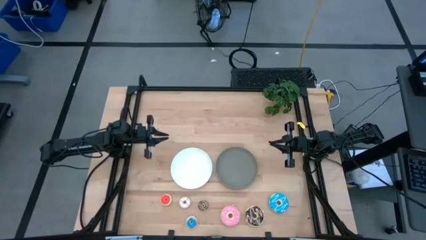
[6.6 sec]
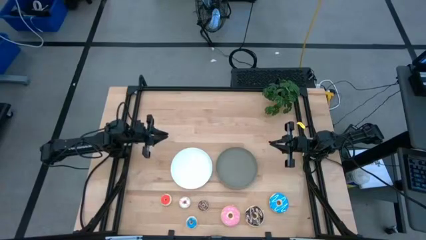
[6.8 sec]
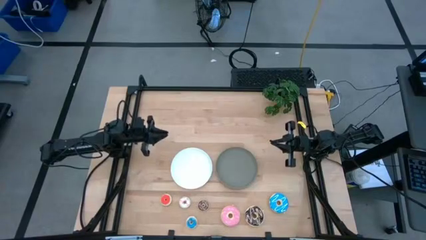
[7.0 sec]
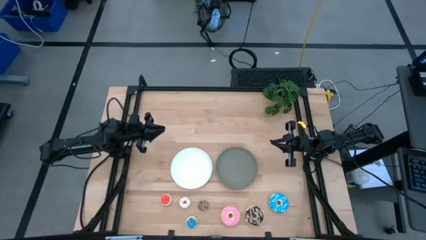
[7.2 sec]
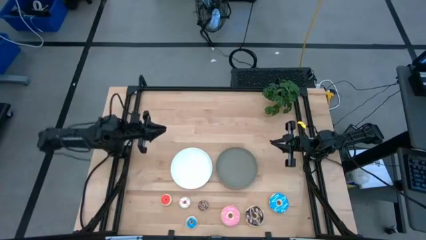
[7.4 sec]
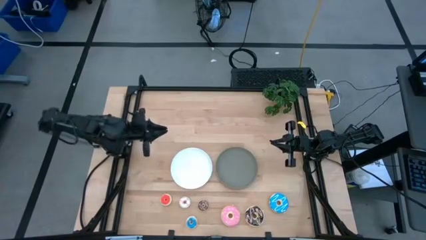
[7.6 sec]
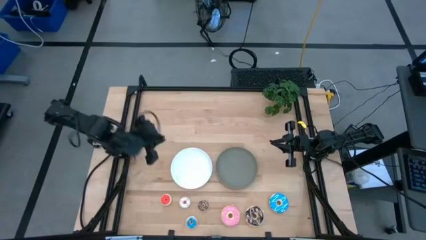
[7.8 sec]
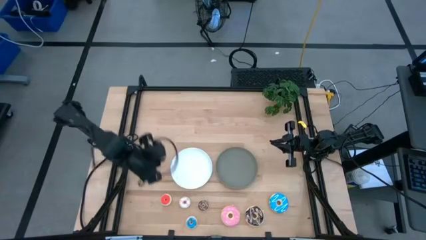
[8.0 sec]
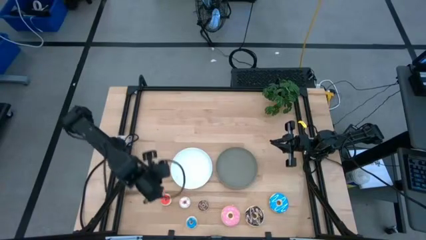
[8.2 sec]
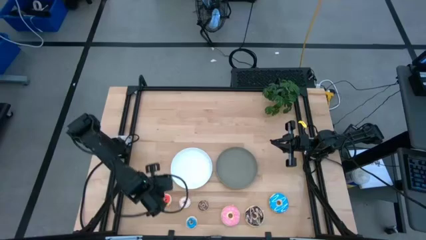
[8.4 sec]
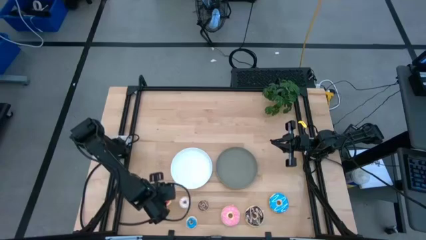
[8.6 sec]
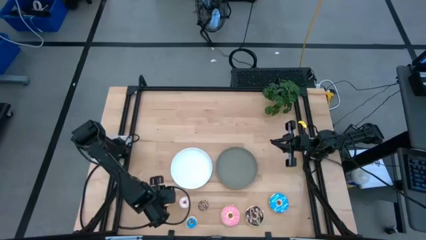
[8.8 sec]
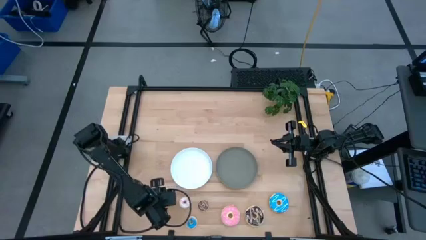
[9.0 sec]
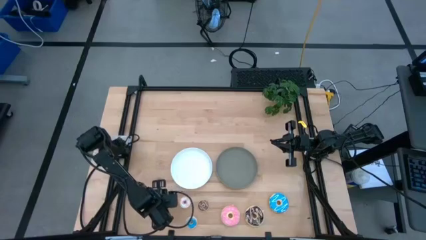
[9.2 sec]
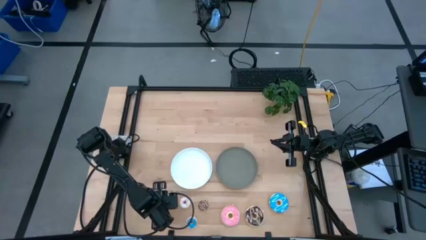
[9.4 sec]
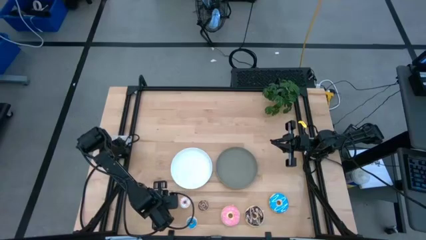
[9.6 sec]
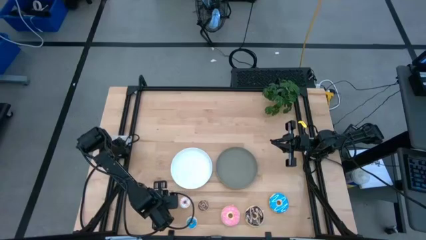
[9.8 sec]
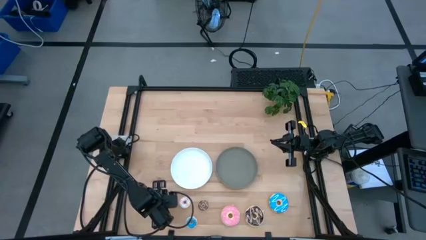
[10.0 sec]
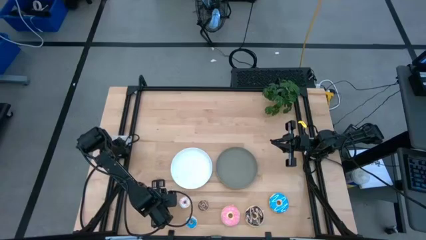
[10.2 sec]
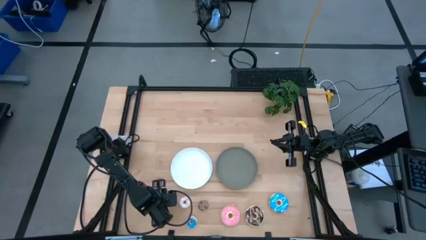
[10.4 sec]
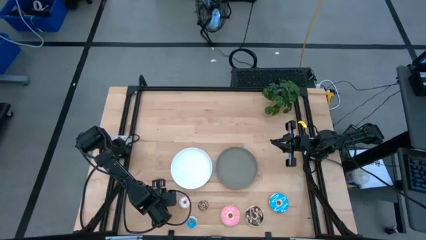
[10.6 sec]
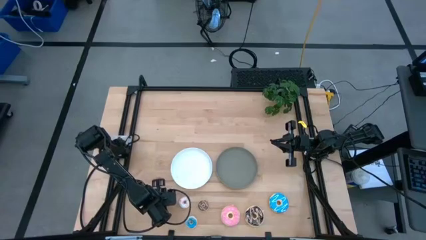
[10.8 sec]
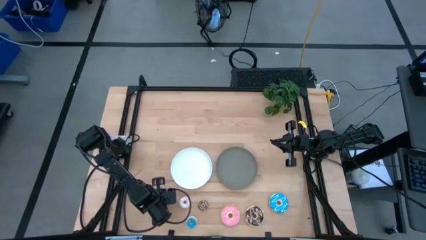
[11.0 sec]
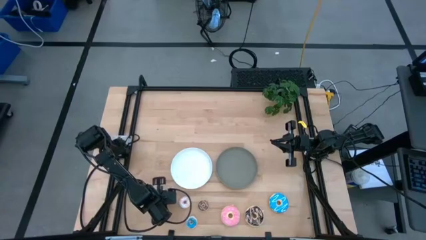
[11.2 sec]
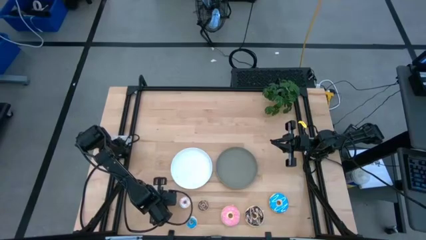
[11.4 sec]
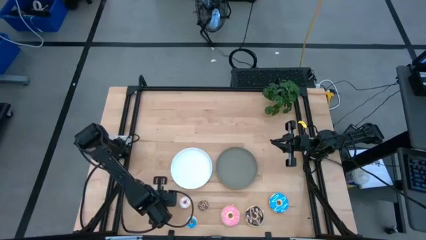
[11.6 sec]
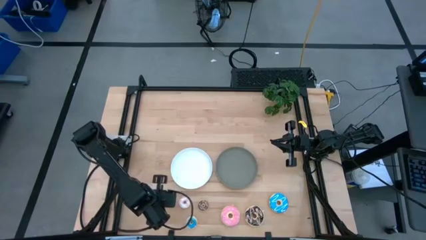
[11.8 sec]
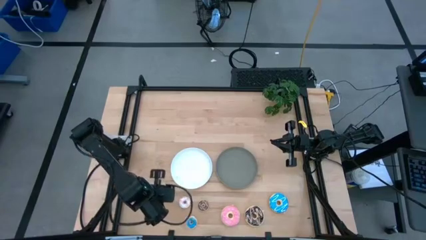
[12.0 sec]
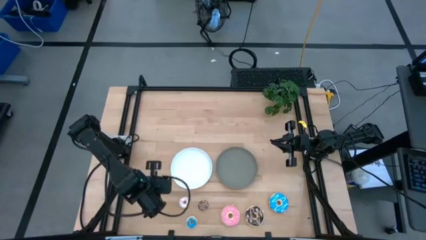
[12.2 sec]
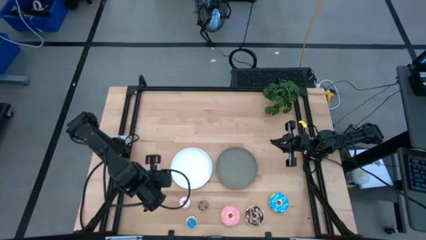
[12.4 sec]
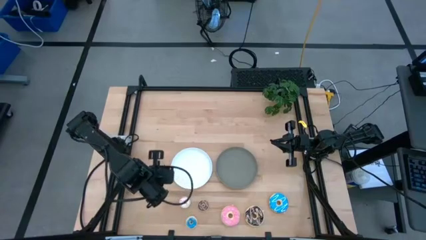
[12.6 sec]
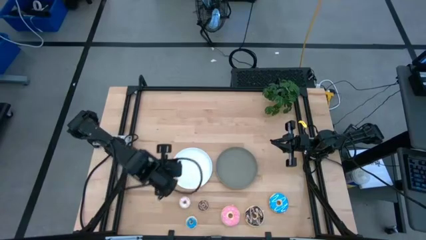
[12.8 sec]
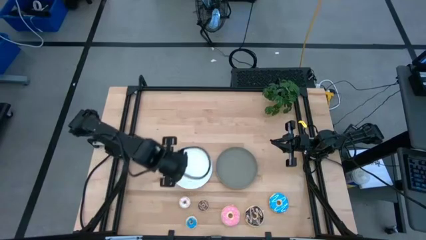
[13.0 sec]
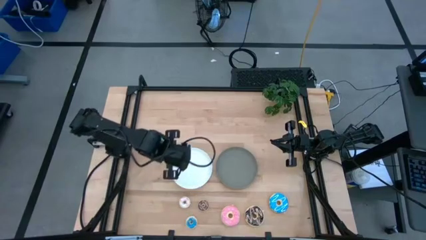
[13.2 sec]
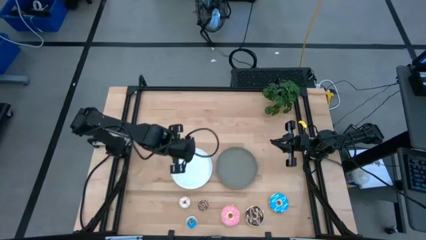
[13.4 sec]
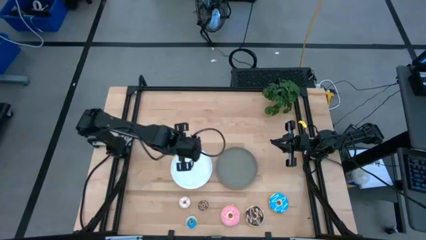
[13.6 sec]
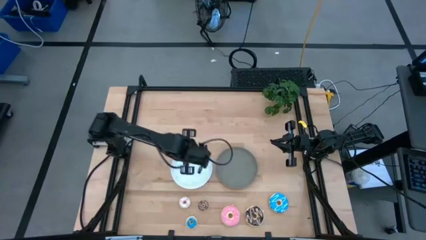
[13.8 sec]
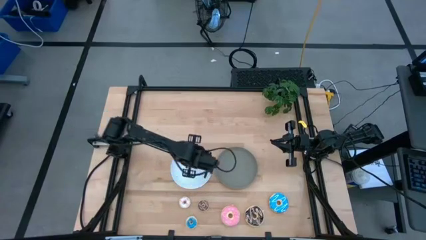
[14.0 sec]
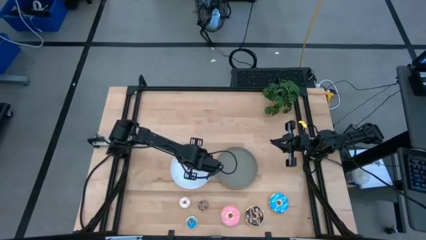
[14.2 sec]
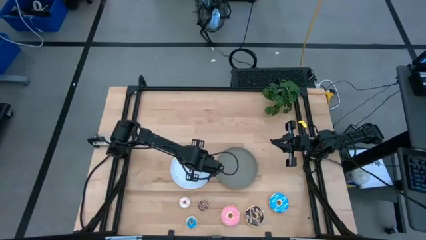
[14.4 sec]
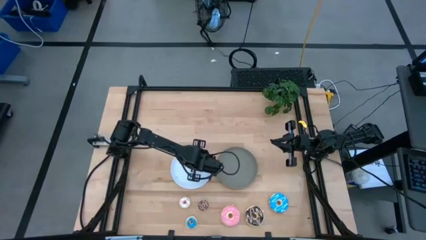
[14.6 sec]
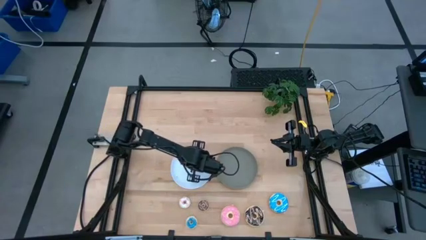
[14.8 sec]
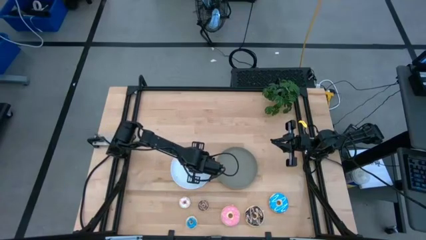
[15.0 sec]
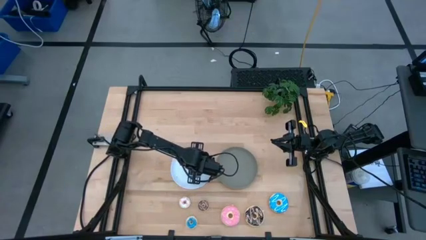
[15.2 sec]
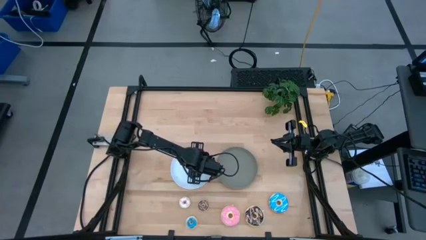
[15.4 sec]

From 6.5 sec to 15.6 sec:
Task: Pick & Place donuts
Put the small orange donut on the white plate

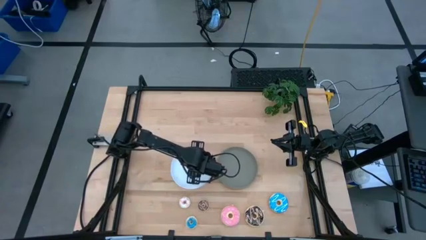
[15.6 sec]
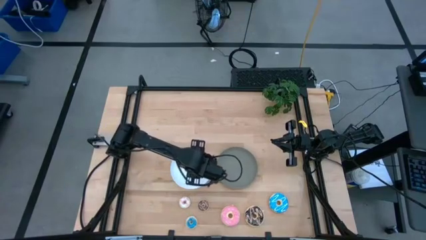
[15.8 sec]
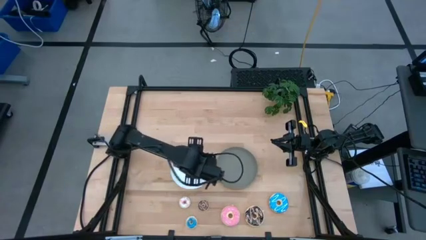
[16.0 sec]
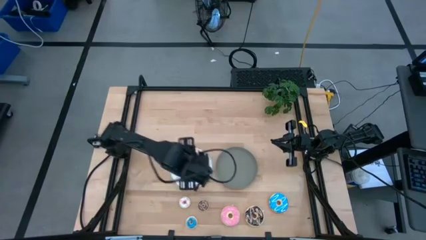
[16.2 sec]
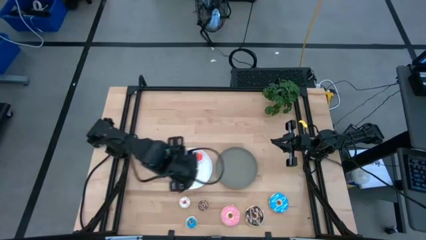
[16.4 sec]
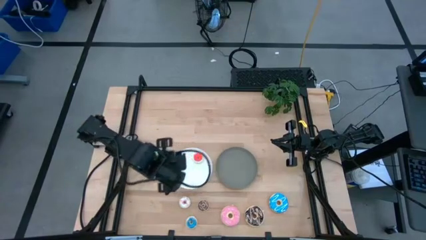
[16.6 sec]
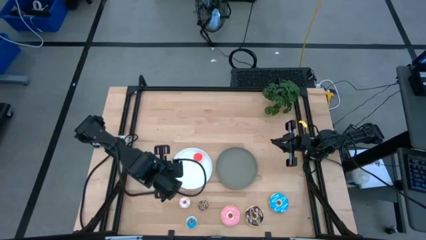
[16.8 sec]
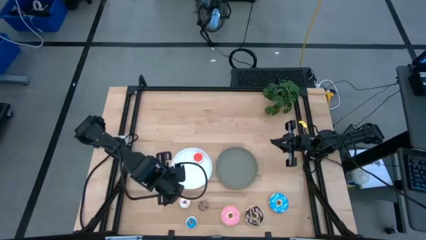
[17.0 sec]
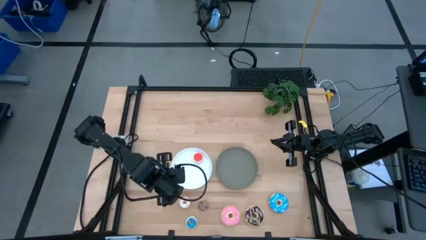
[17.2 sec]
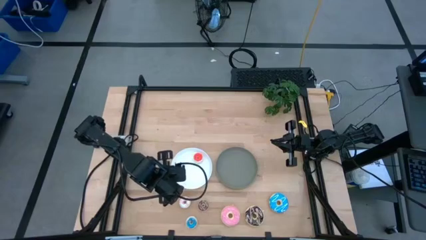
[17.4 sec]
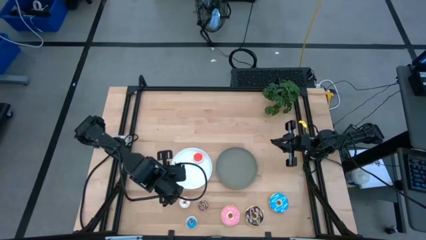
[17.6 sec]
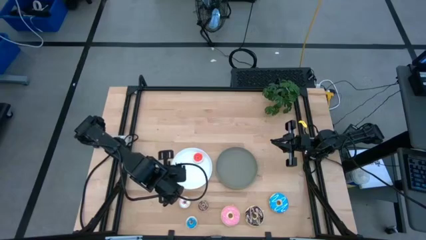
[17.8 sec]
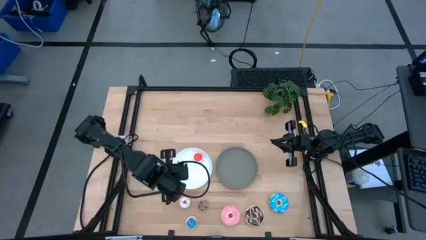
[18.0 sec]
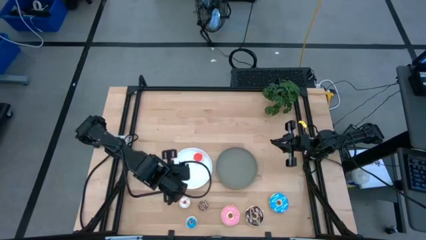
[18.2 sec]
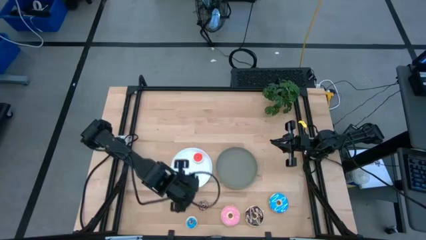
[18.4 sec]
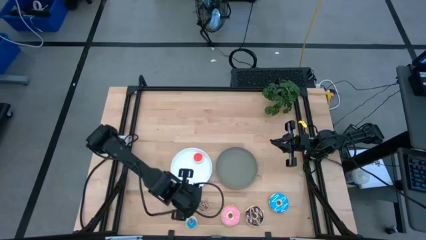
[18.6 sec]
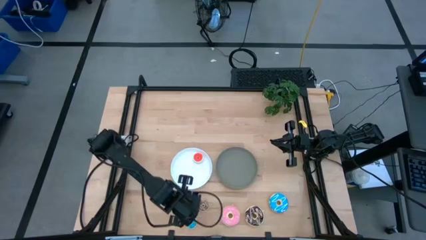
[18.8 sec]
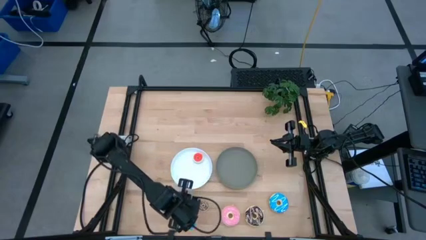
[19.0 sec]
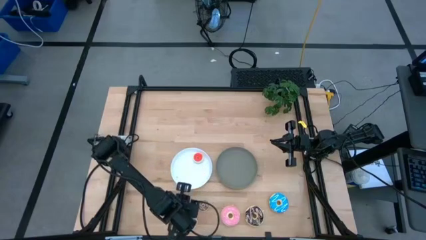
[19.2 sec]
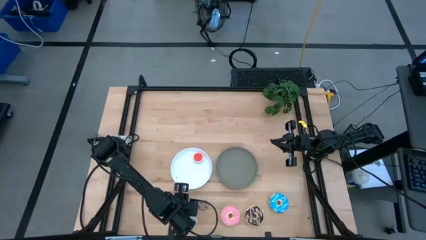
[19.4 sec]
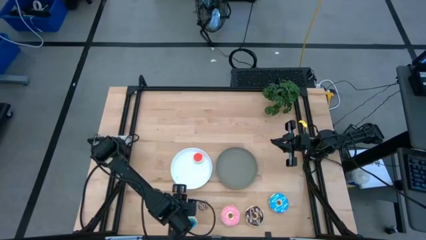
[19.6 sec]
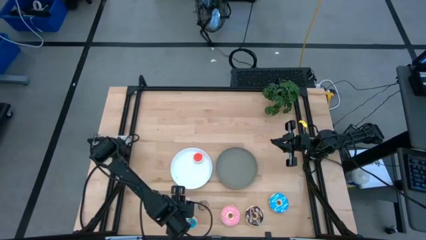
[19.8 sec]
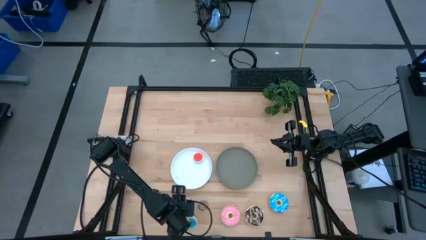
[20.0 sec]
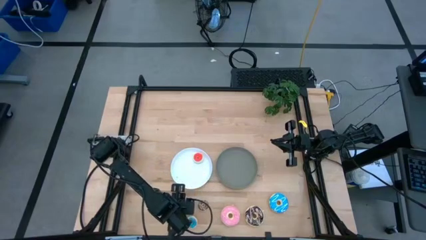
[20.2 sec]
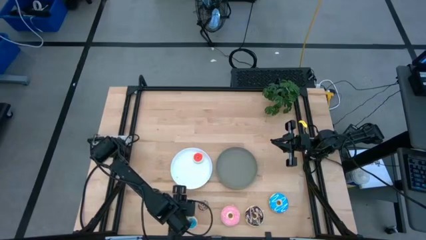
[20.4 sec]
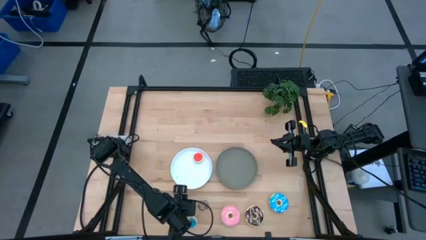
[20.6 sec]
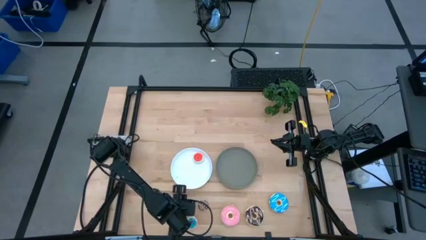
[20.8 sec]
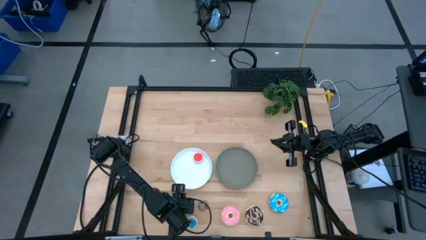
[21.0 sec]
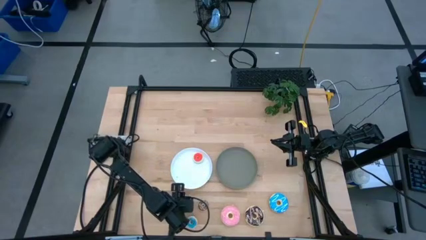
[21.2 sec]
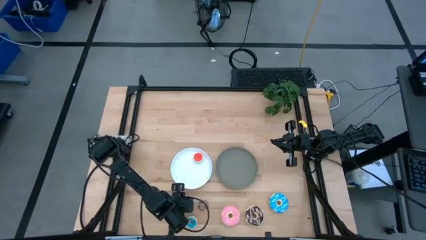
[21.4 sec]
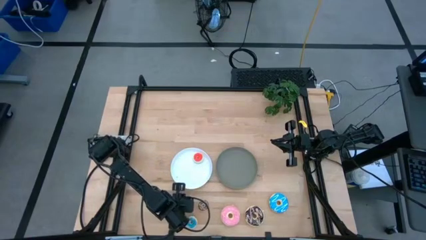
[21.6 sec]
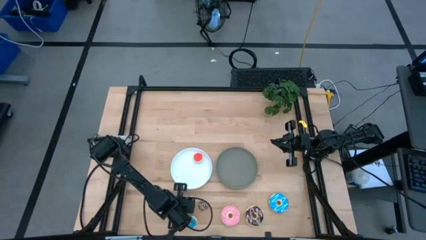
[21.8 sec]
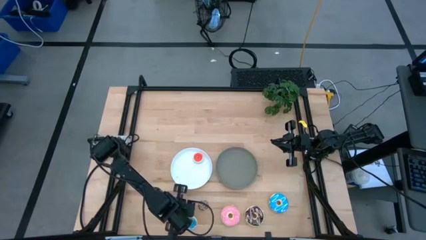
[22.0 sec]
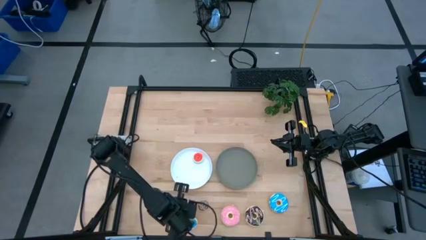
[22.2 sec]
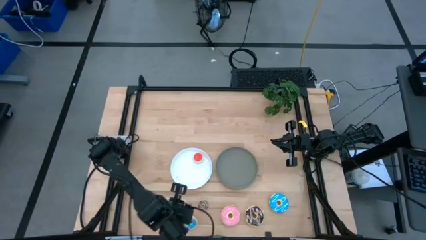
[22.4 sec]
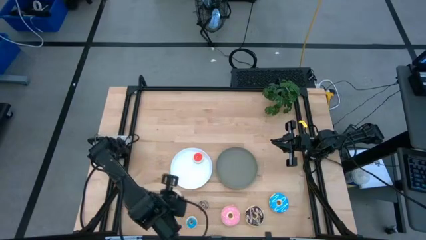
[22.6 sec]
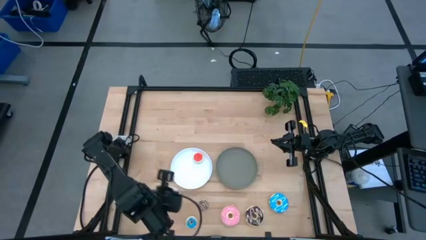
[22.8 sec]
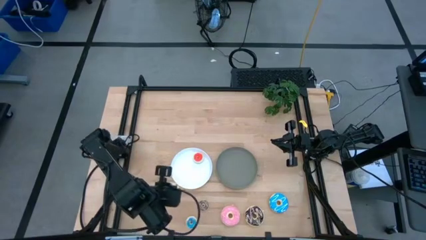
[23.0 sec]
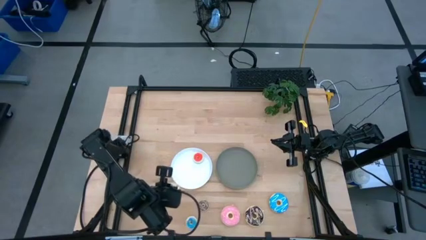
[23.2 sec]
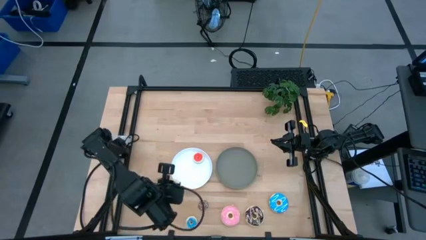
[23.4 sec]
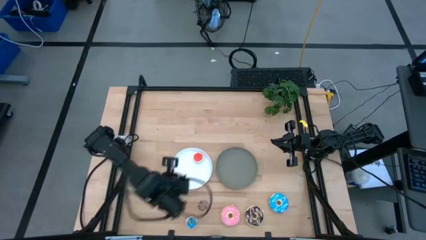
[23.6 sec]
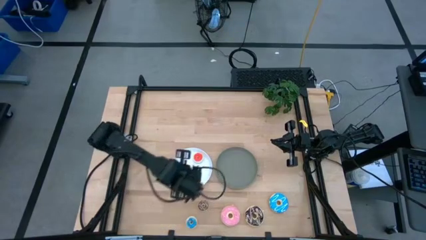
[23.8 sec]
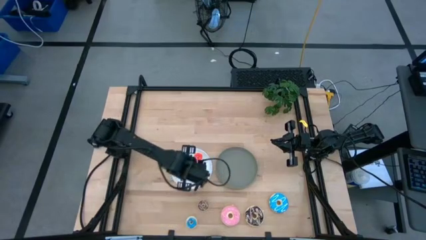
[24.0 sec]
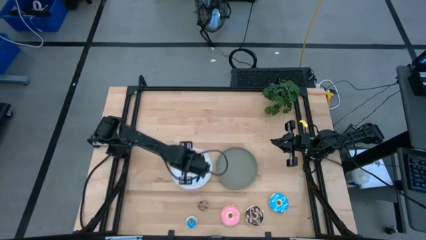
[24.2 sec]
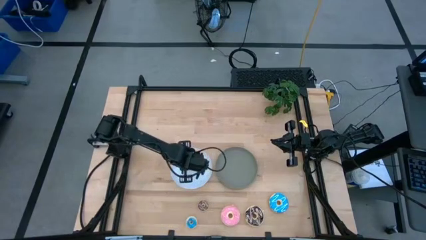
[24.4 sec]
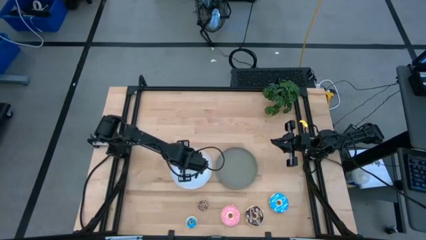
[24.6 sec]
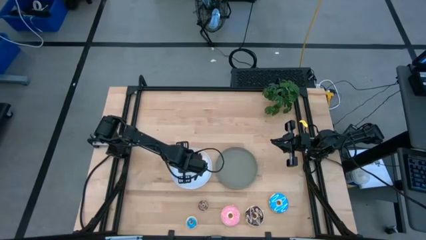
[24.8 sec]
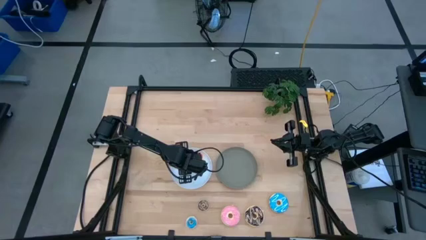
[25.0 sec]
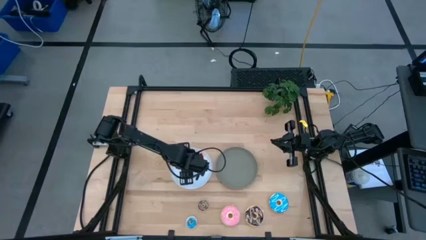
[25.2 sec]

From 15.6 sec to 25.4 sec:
Put the small white donut on the white plate
